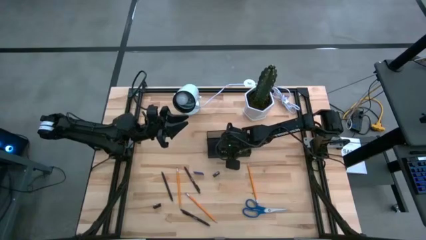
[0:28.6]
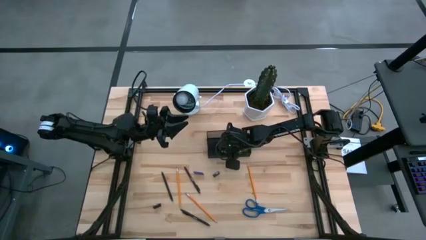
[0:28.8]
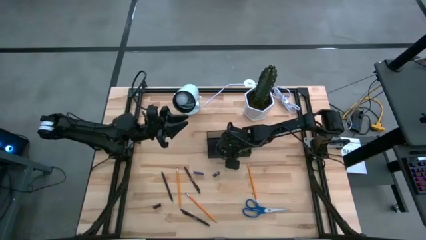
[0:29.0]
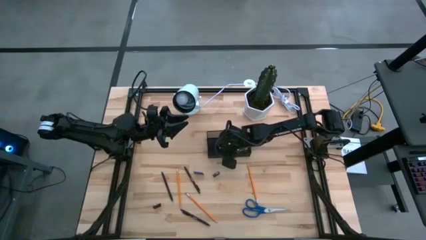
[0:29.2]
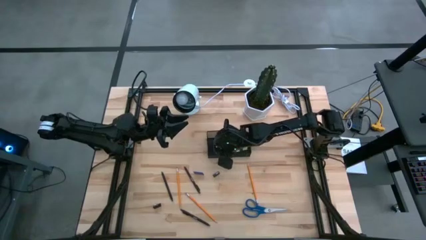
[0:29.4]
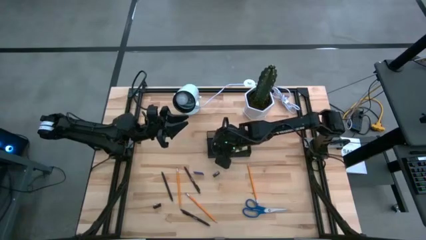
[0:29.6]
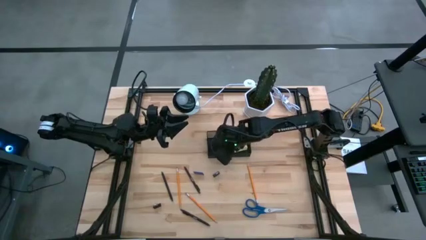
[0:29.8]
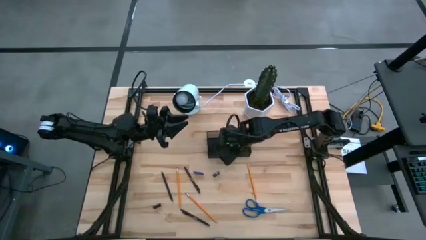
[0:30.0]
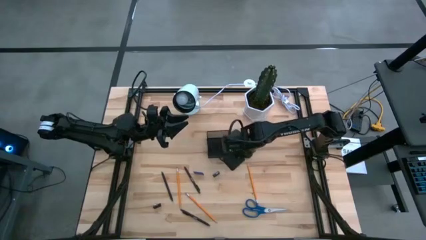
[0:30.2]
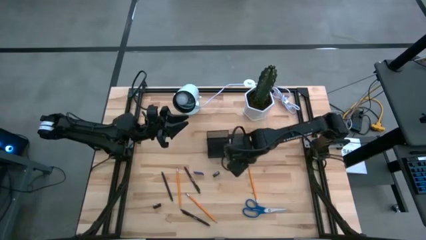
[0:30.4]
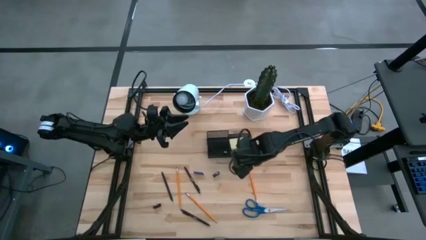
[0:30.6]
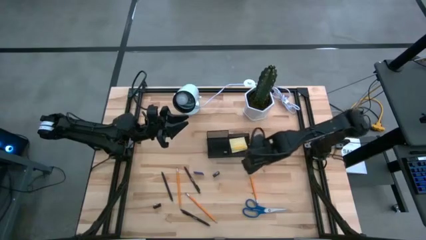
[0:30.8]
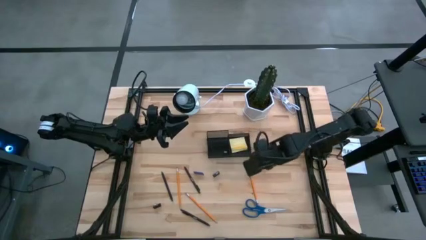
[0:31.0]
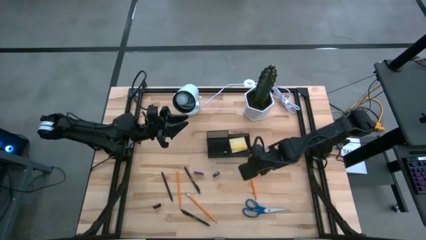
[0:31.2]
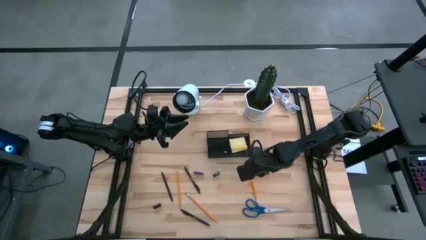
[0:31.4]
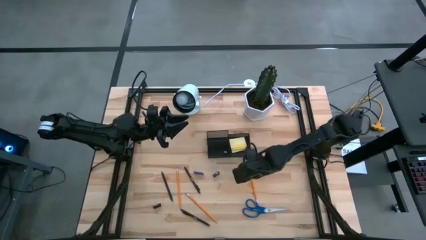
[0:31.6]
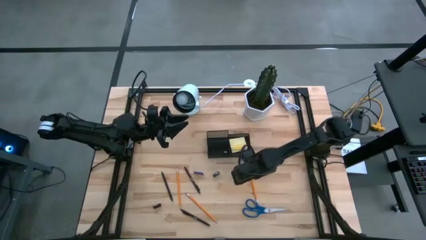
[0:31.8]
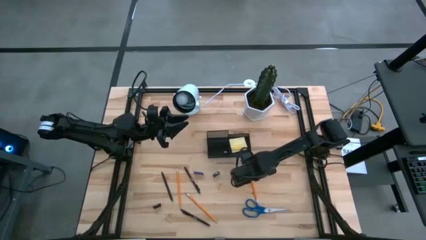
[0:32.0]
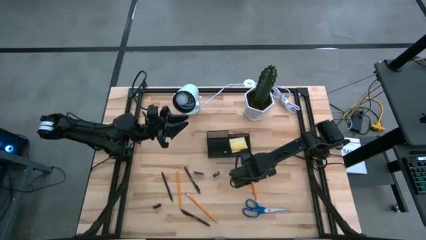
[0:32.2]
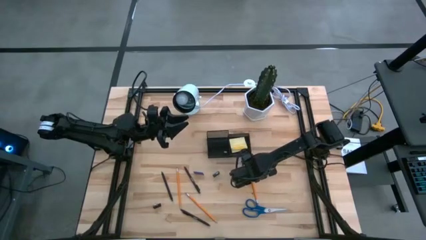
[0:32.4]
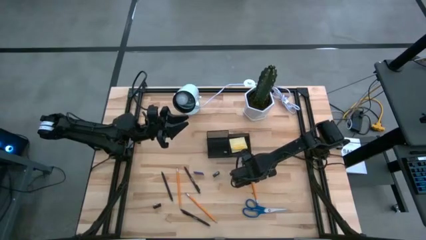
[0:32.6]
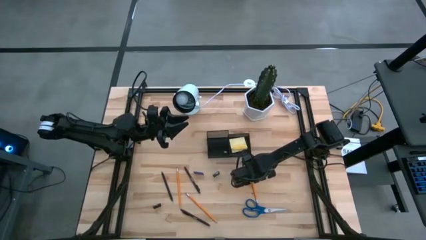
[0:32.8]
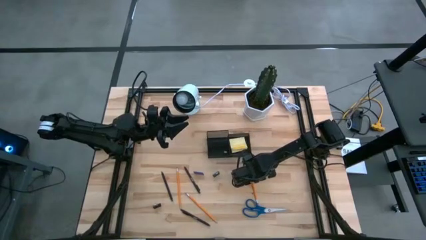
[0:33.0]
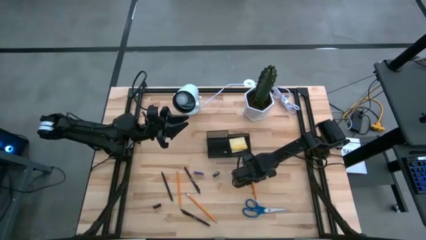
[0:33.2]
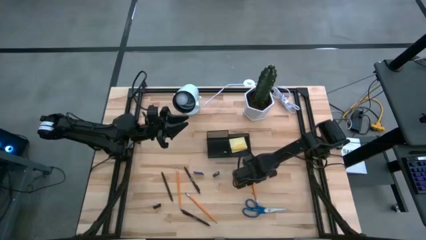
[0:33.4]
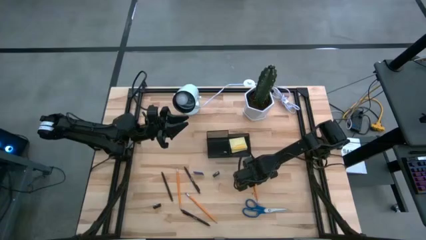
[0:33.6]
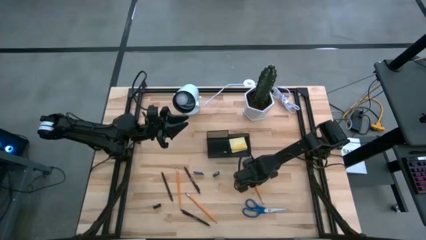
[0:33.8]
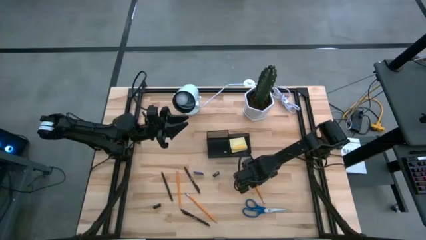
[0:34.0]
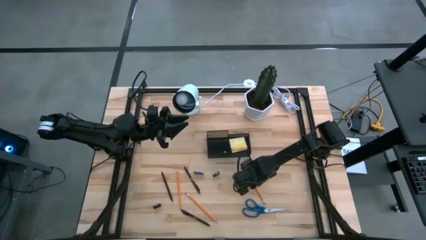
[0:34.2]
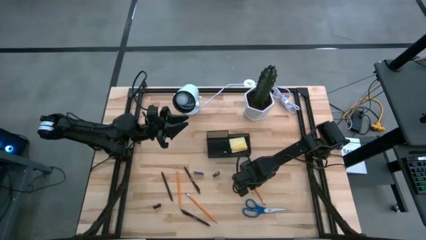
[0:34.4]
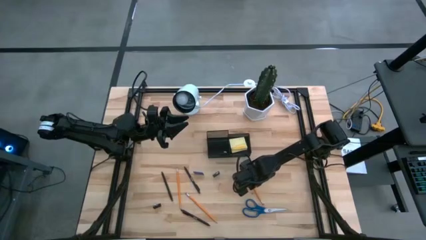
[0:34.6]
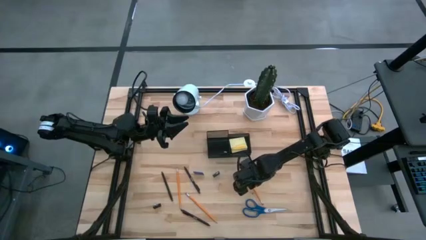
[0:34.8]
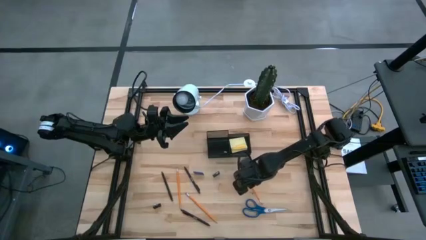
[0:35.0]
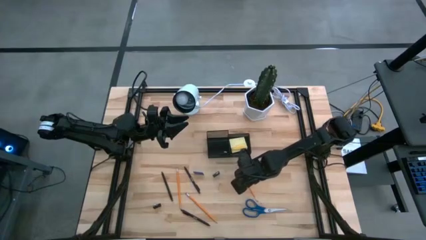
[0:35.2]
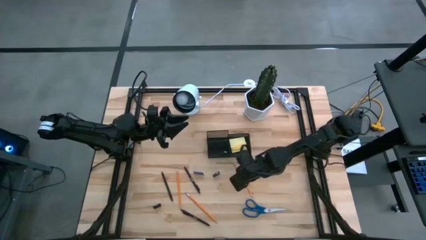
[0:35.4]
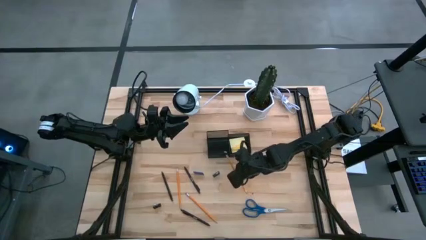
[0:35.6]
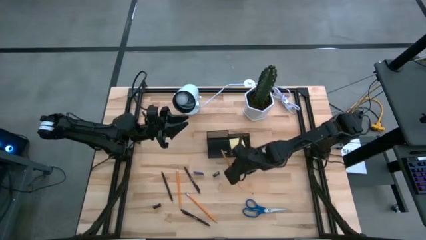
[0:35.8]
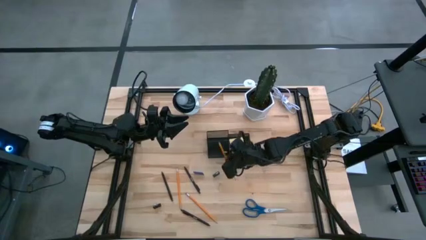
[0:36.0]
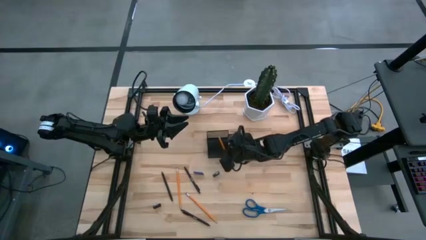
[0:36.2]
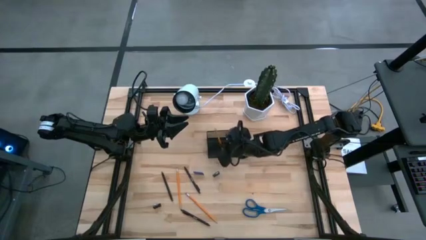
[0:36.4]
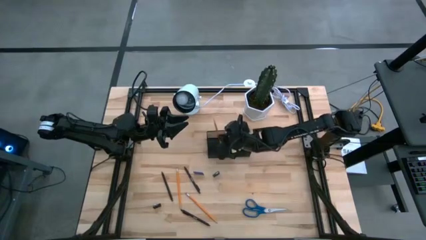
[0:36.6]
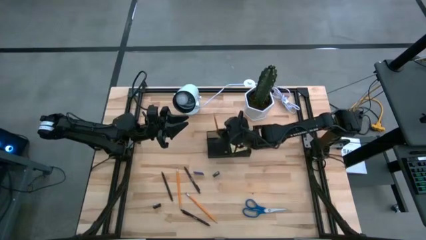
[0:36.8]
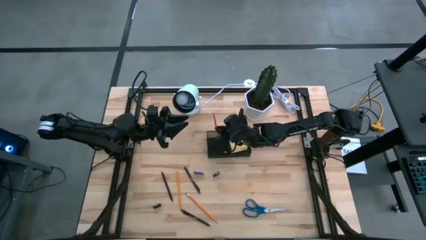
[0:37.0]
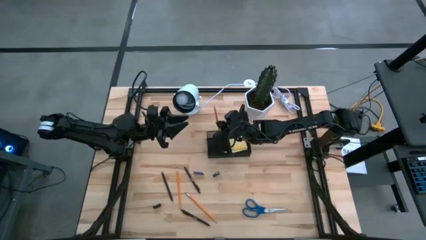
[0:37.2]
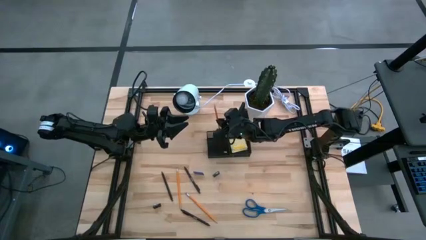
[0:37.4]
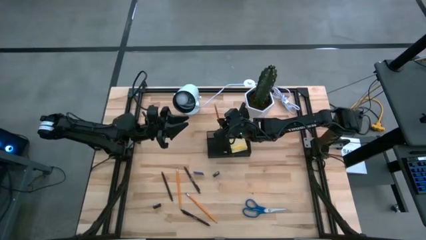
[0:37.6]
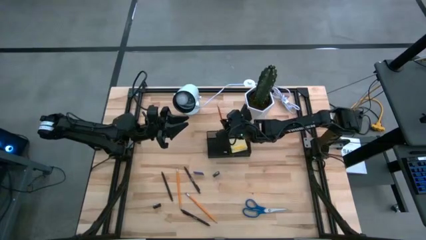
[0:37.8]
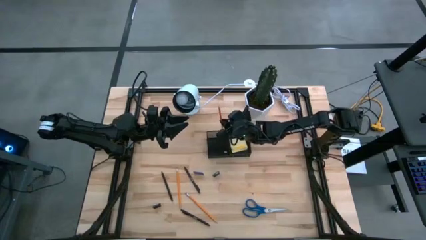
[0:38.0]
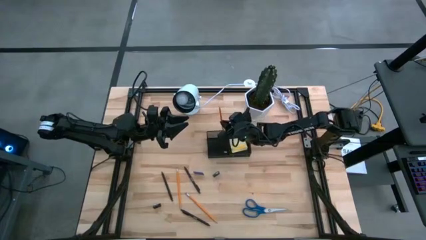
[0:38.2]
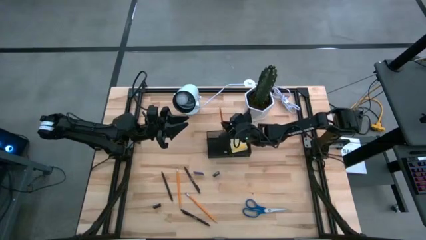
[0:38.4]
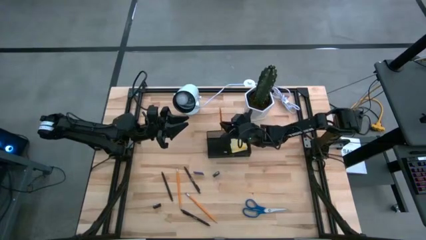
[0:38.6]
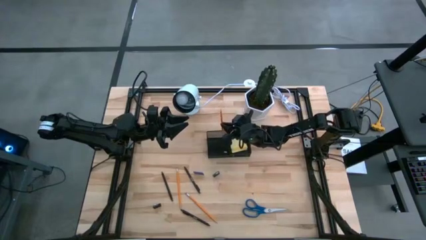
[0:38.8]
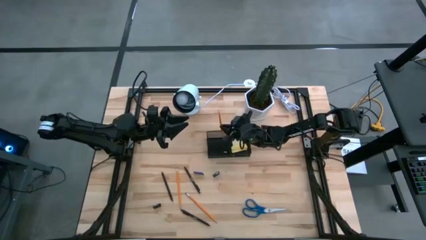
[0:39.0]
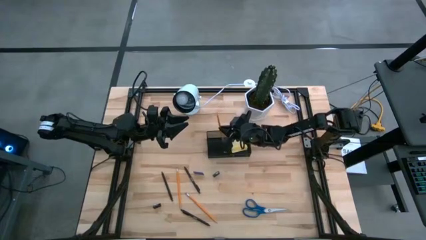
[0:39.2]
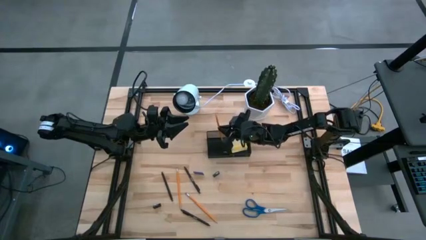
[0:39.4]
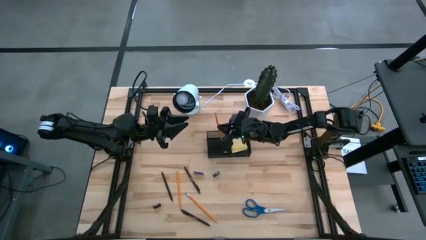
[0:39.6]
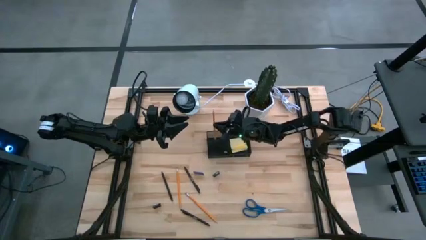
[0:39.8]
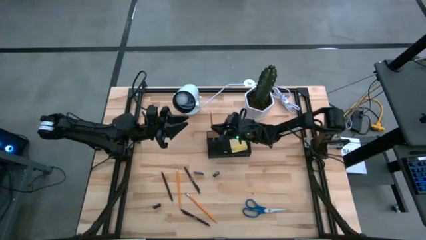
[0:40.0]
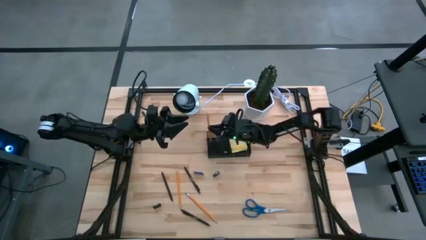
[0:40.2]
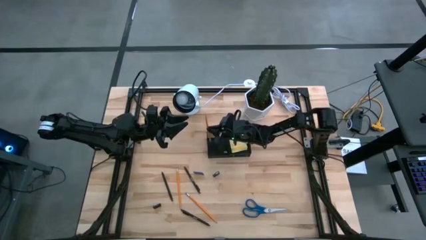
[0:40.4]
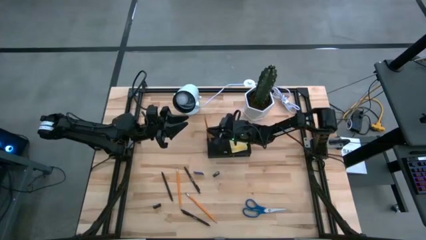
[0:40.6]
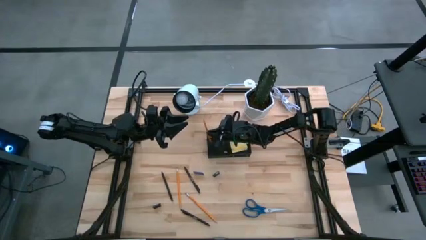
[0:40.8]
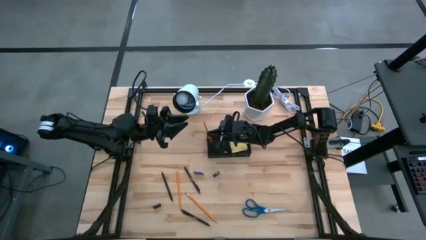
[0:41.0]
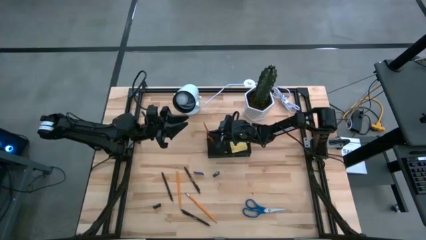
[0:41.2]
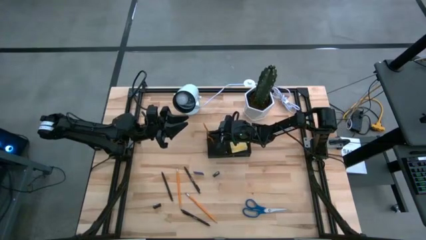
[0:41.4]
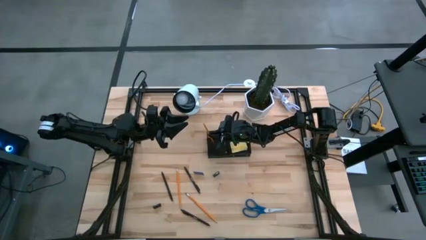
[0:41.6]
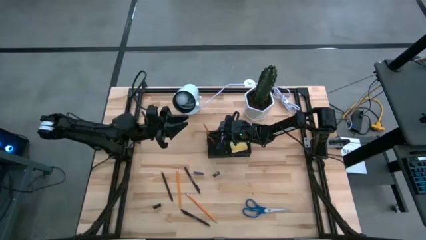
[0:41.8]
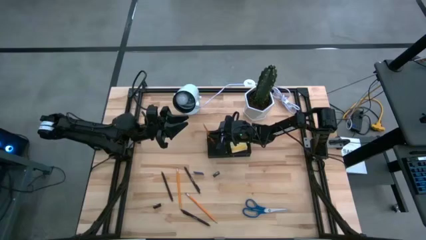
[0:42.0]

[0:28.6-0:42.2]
Task: Pick and place office supplies into organizer
Put the right yellow pencil into the black desk organizer
